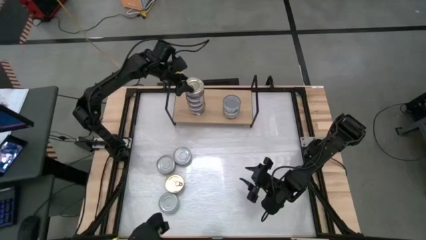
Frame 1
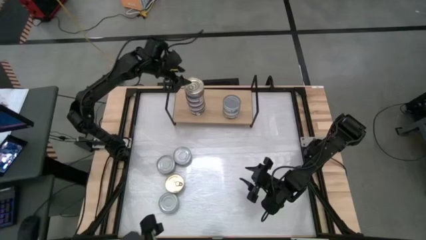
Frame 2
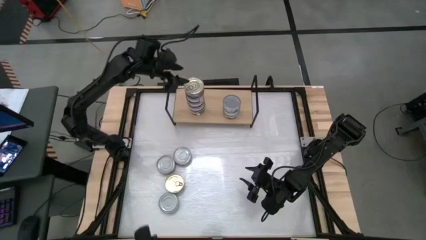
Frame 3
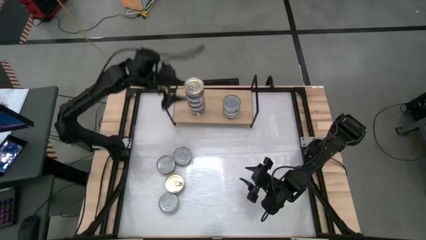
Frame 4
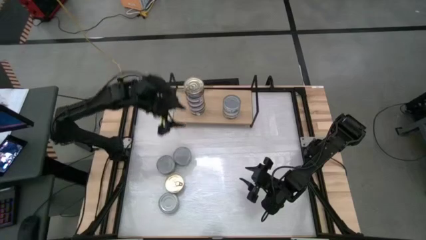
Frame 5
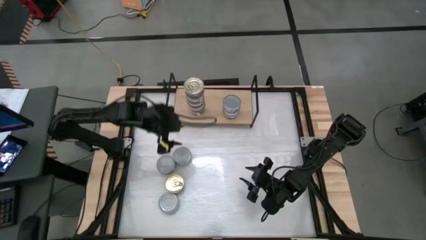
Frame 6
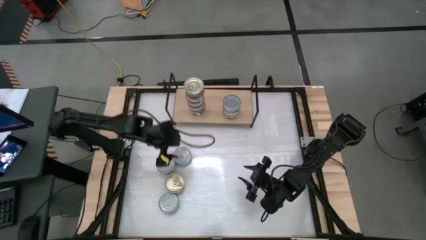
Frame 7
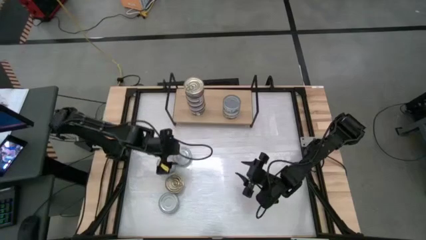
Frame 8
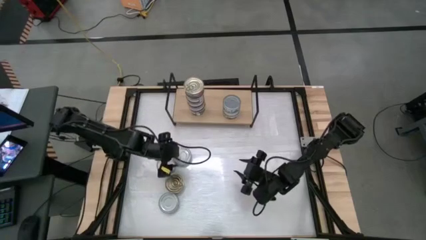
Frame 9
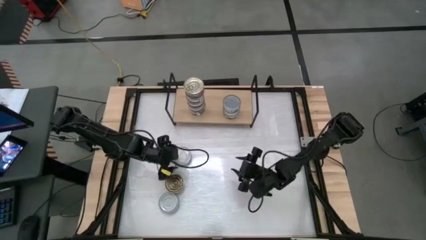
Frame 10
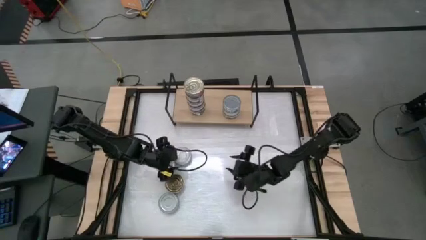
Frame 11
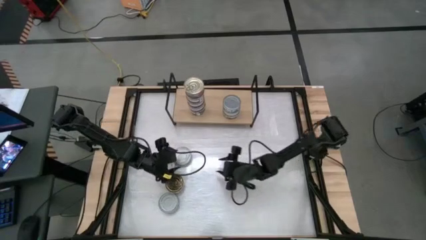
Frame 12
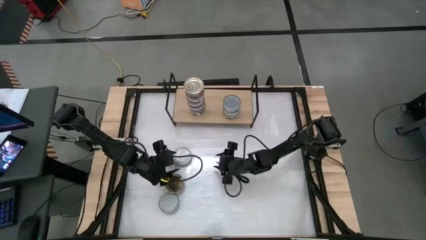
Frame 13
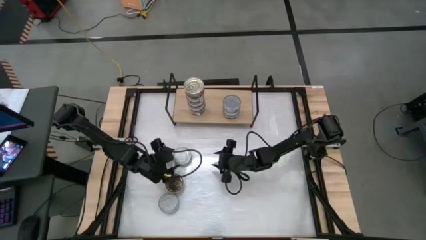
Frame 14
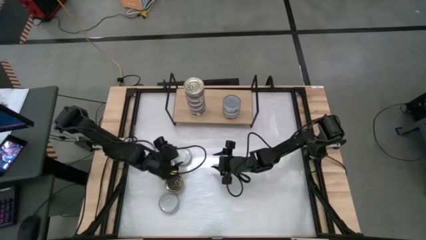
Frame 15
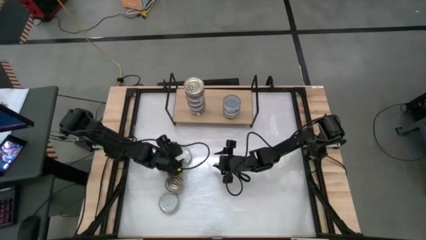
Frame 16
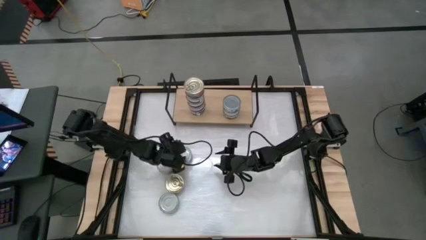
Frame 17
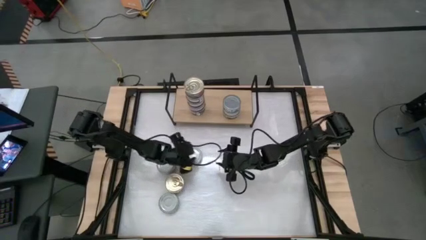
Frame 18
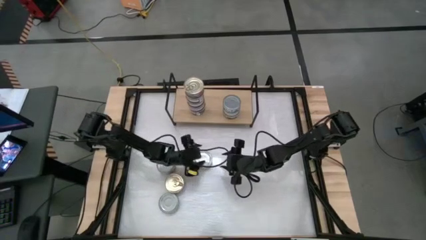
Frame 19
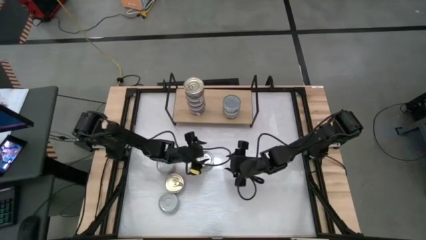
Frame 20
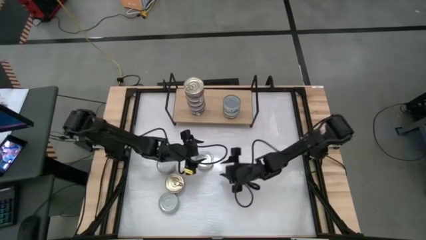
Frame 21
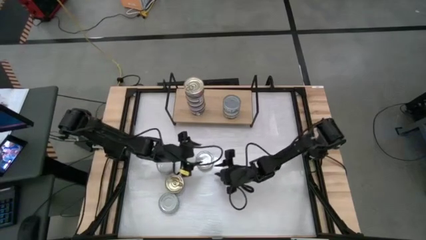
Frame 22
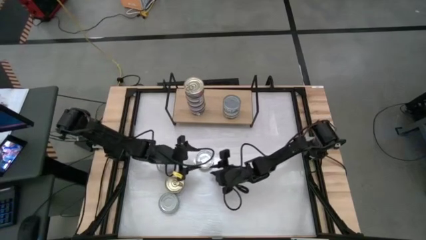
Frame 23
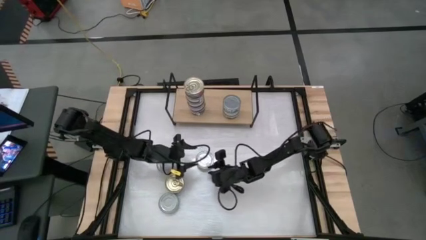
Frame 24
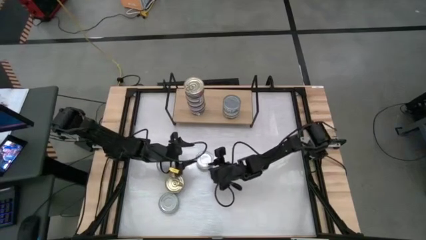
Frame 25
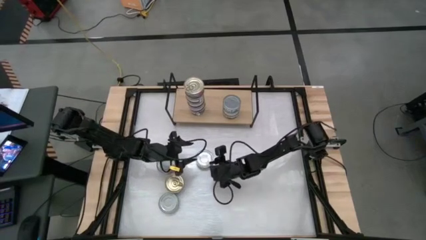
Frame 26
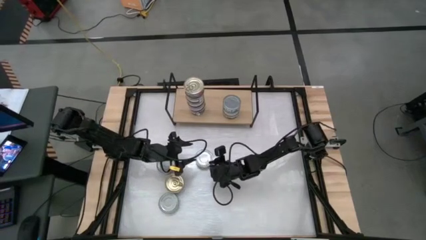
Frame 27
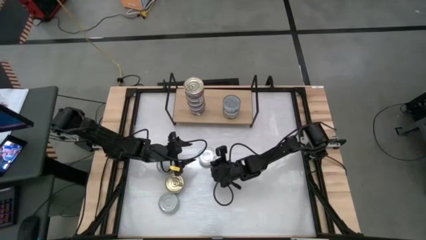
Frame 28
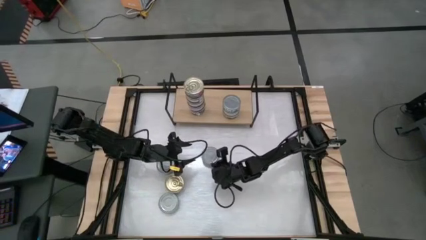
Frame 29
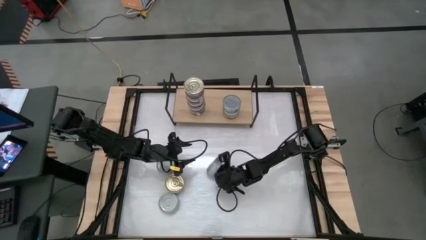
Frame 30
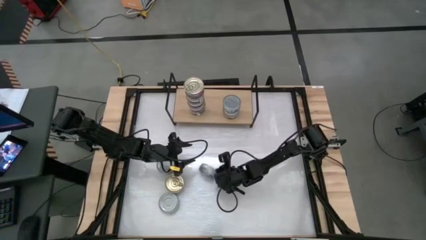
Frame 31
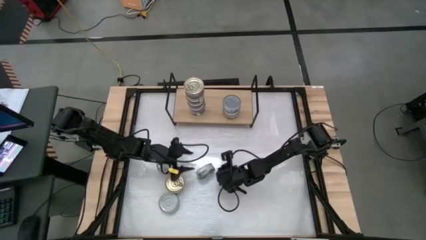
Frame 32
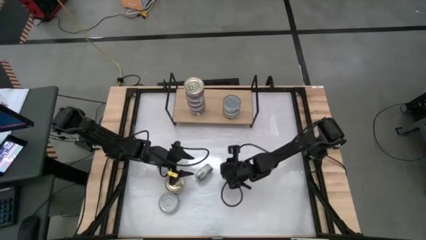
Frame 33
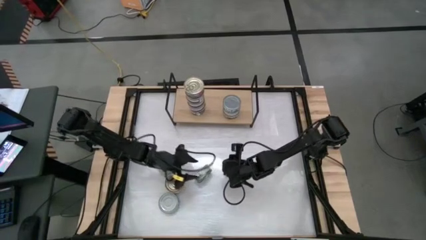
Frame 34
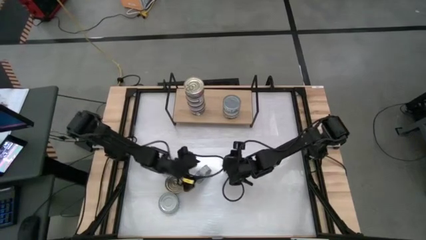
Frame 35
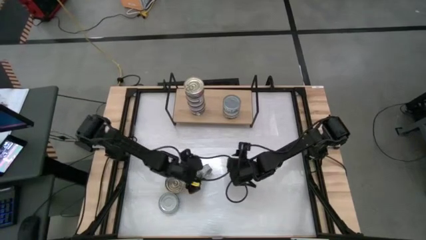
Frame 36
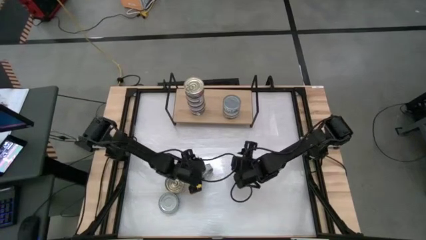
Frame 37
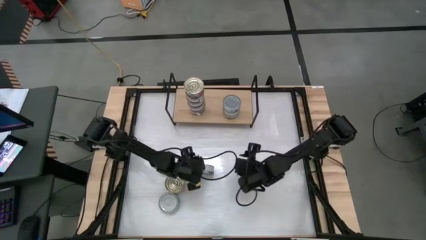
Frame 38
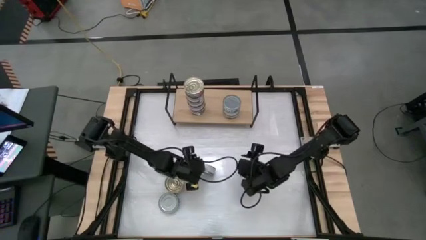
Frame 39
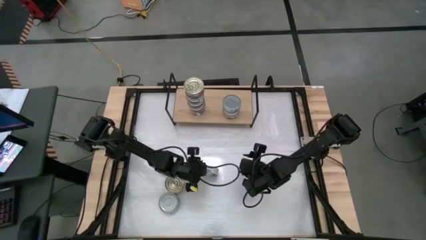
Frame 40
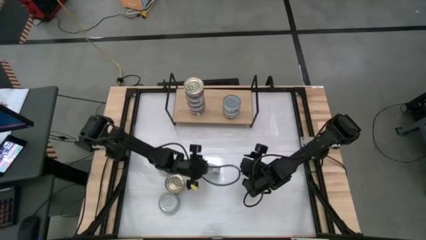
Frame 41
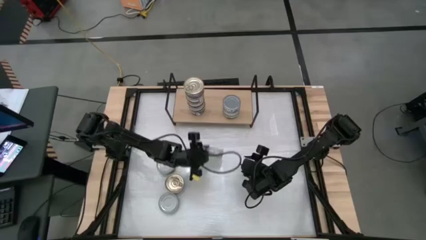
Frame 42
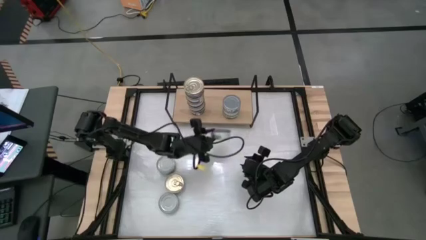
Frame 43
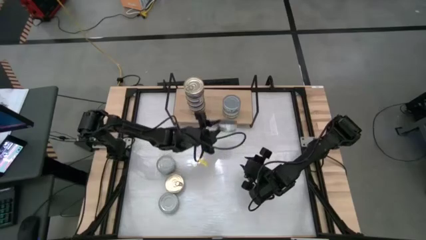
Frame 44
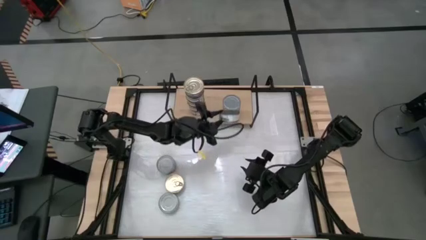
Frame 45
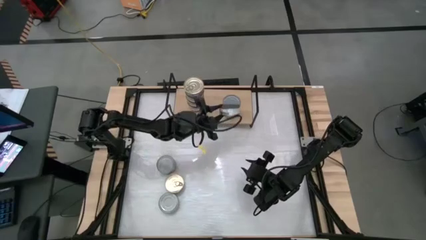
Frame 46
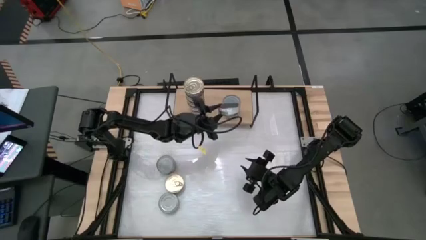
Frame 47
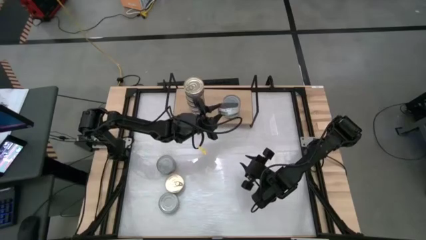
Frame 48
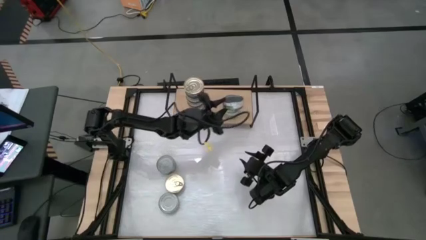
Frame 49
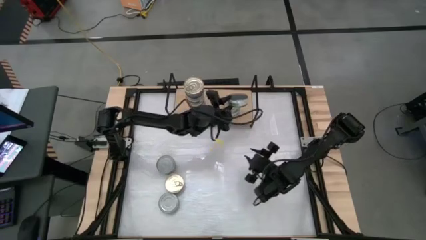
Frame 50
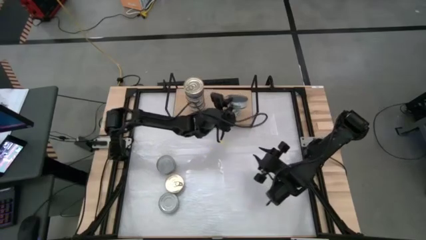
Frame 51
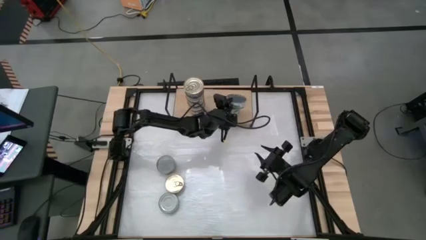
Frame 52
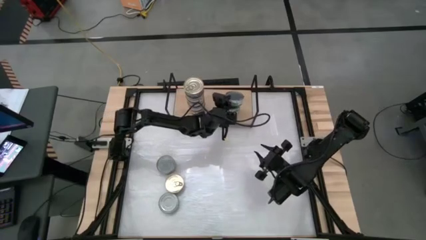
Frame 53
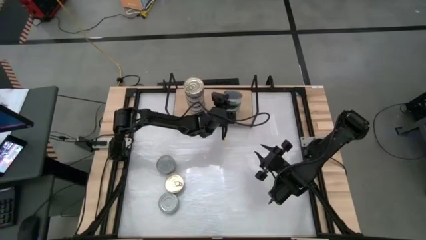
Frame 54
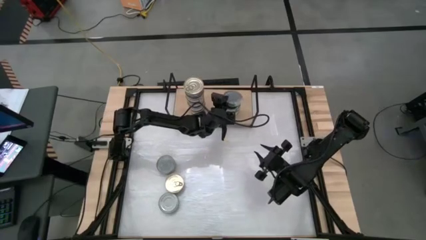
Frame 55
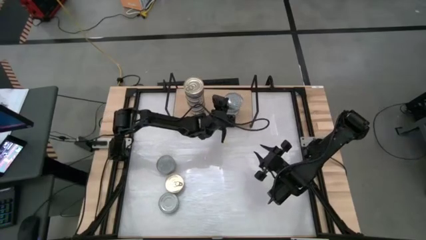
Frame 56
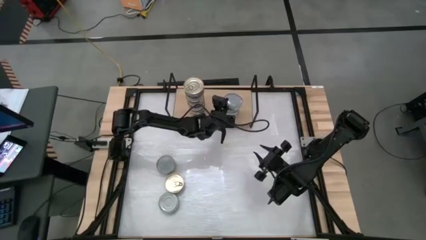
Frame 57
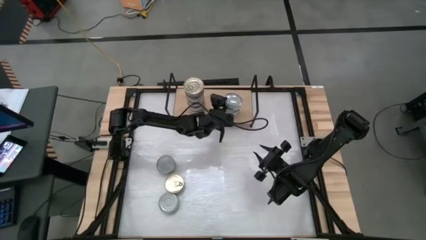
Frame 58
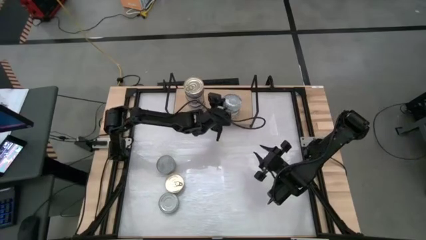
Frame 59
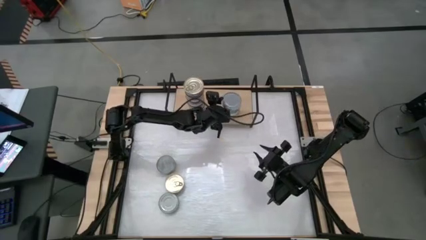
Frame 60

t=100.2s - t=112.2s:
Task: Stack canned seafood by type on shelf
Stack the green tuna can on top of the other green tuna can on the shelf

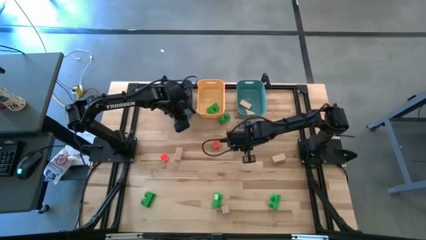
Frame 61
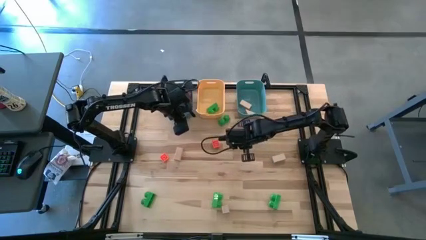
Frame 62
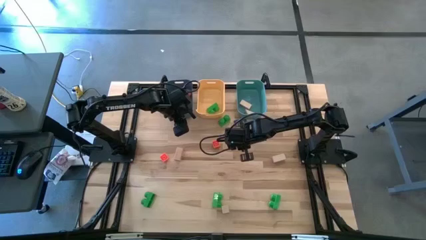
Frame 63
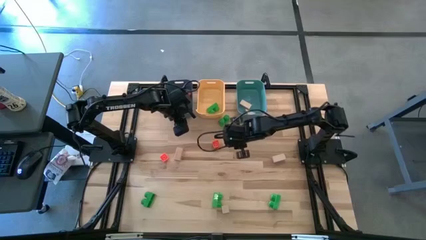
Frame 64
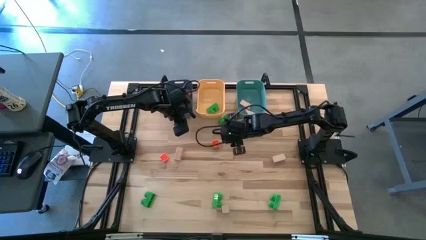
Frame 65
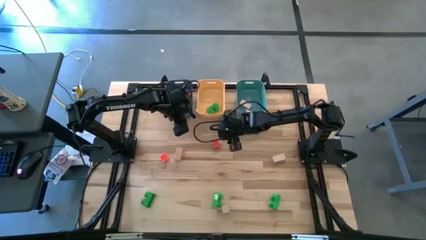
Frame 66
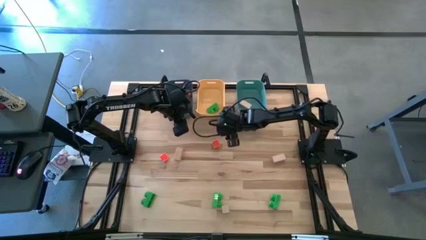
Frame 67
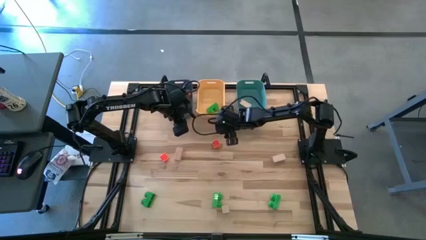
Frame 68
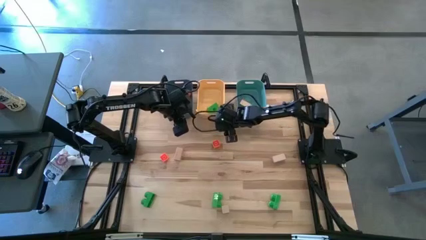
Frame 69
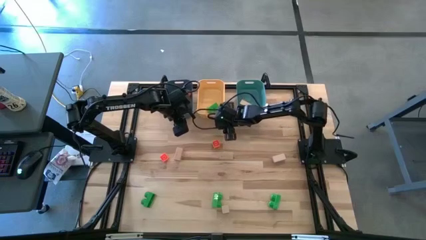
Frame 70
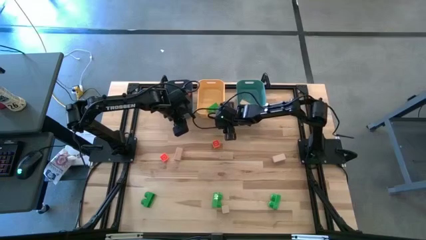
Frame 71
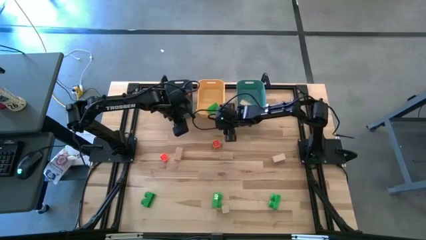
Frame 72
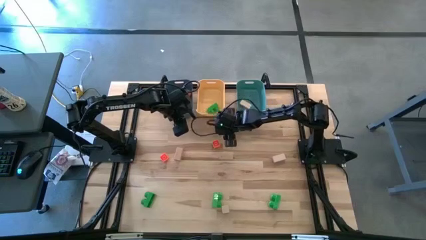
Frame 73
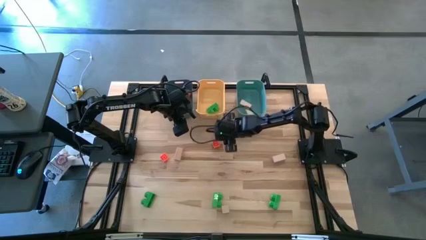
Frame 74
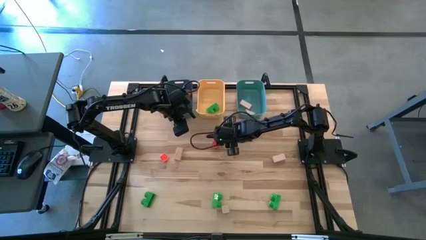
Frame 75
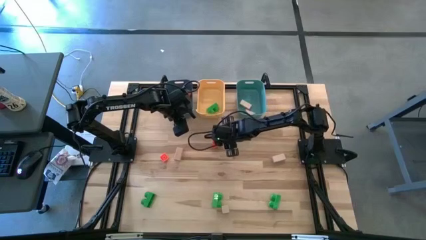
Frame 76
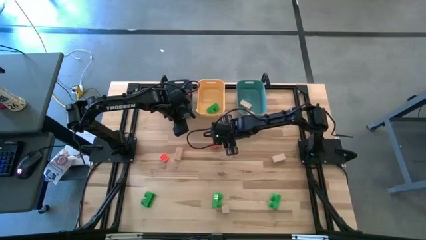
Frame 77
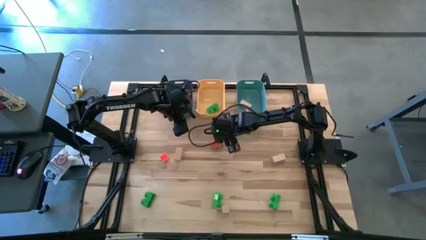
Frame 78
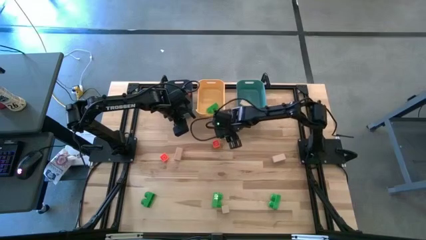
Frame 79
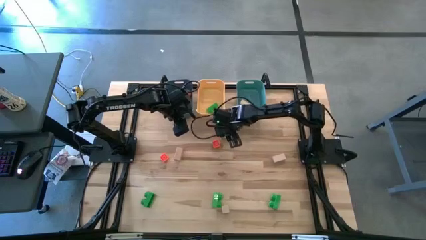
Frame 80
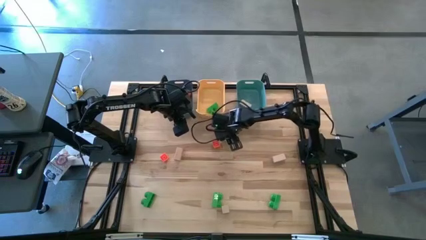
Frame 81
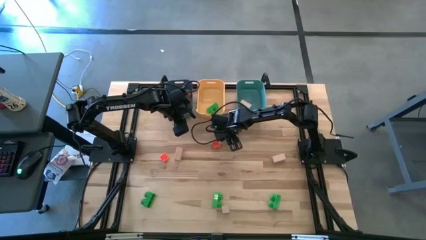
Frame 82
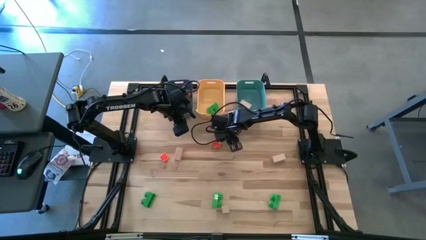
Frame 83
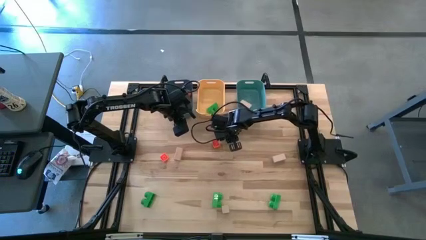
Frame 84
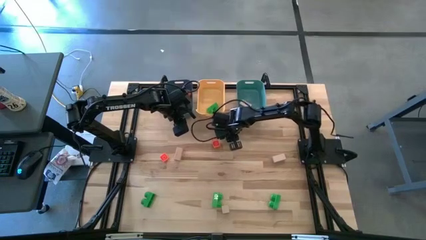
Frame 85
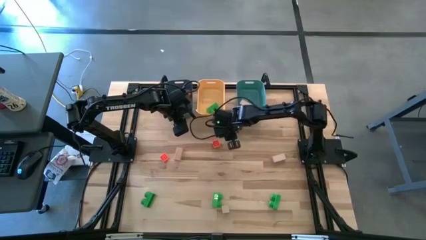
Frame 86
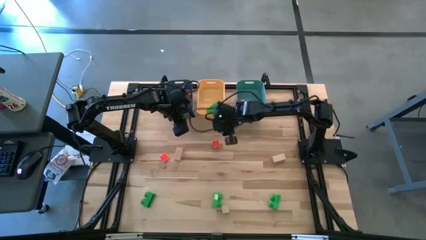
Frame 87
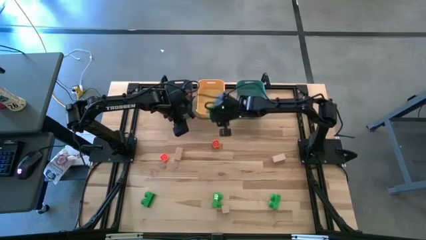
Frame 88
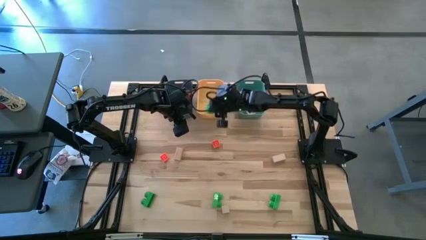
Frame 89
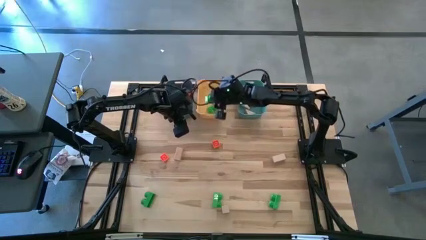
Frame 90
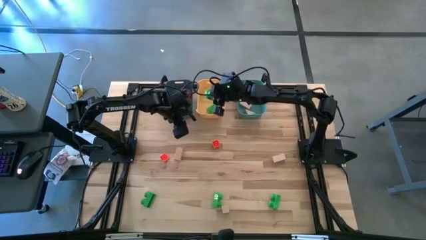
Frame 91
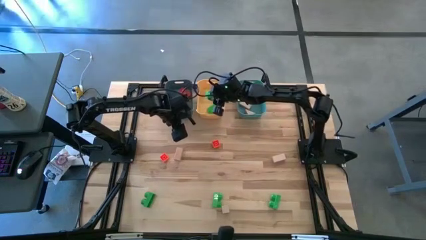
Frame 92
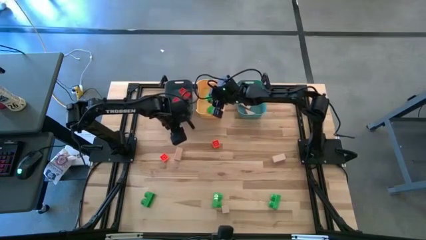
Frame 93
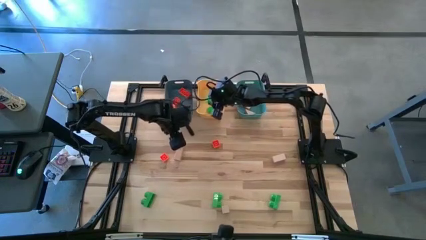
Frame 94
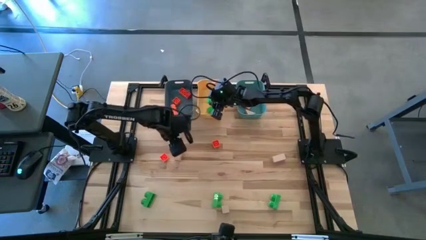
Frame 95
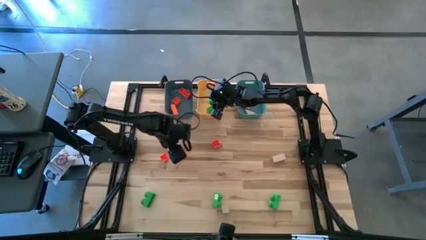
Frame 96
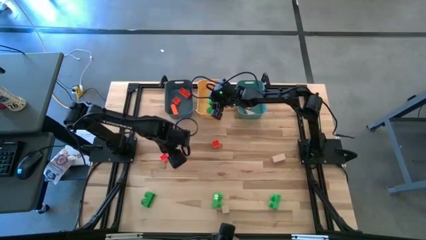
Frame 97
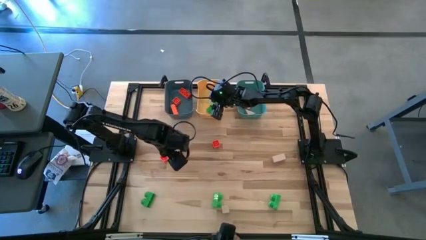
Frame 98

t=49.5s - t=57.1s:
Task: Sort & place blocks by color
Put the green game piece into the yellow bin
